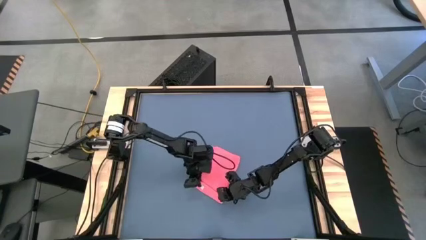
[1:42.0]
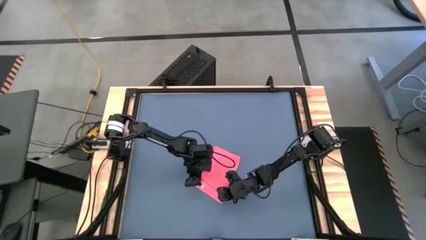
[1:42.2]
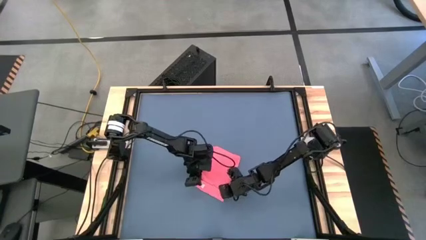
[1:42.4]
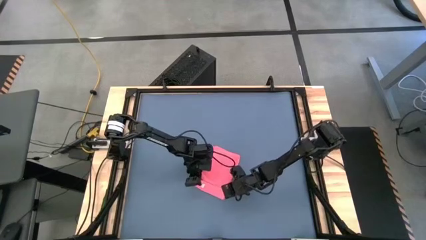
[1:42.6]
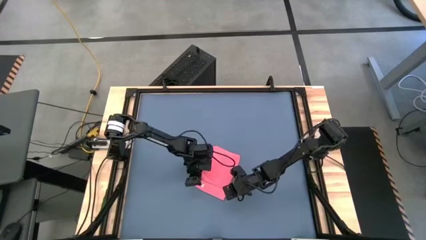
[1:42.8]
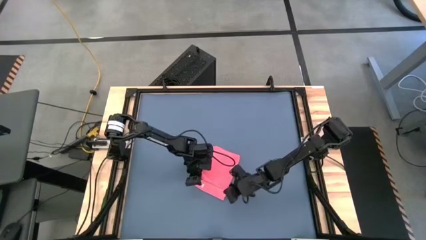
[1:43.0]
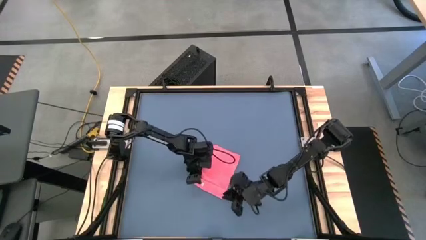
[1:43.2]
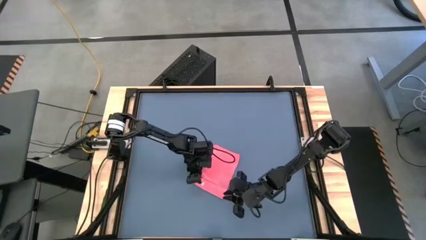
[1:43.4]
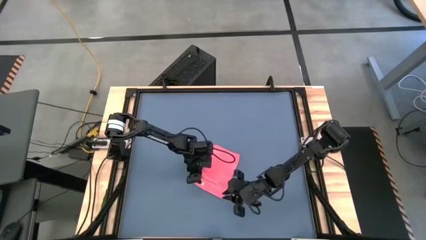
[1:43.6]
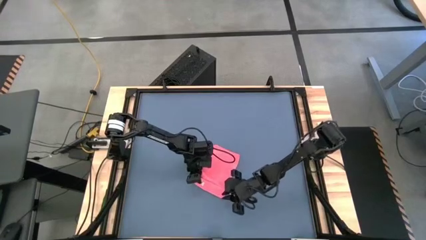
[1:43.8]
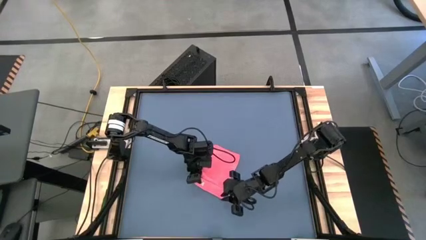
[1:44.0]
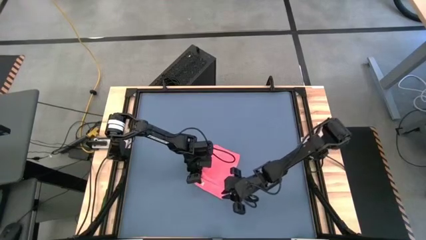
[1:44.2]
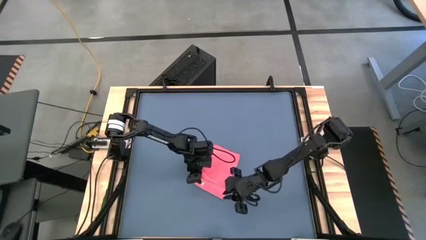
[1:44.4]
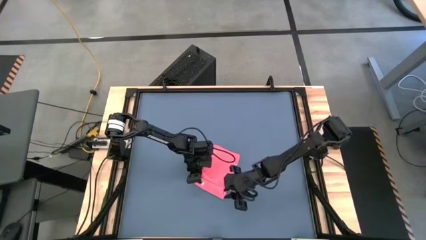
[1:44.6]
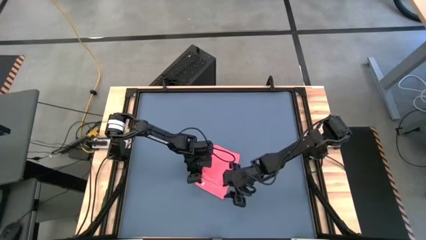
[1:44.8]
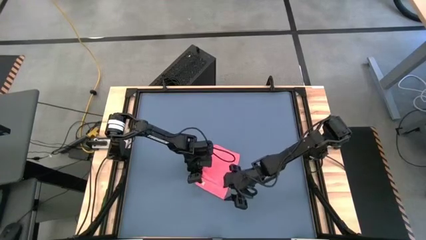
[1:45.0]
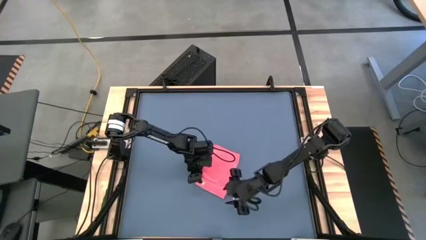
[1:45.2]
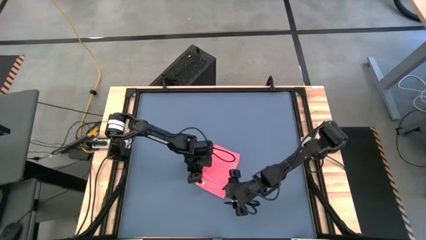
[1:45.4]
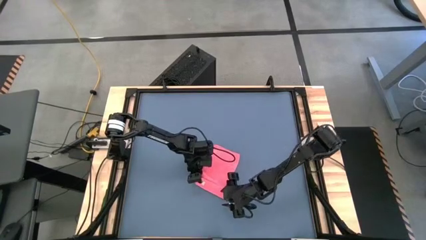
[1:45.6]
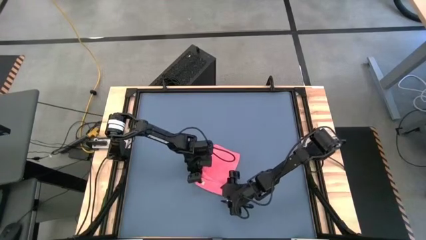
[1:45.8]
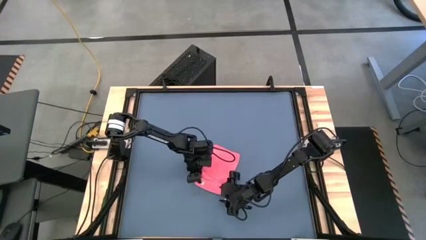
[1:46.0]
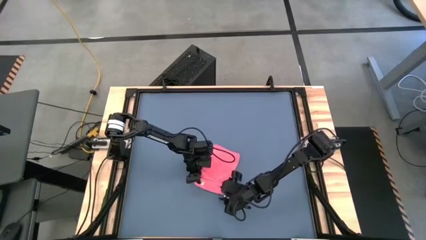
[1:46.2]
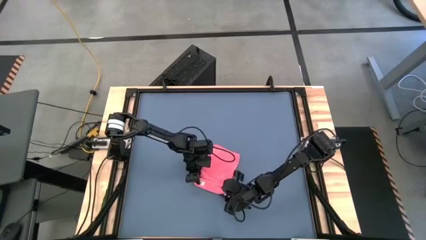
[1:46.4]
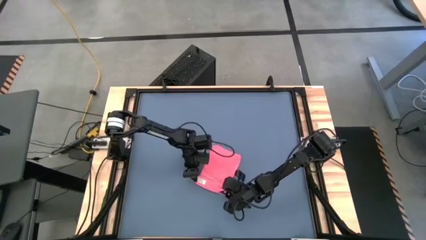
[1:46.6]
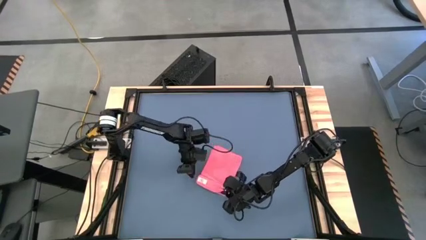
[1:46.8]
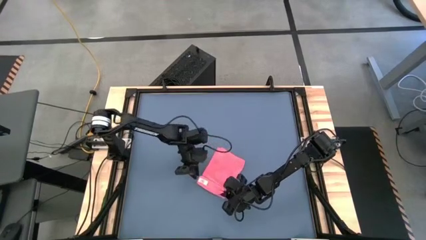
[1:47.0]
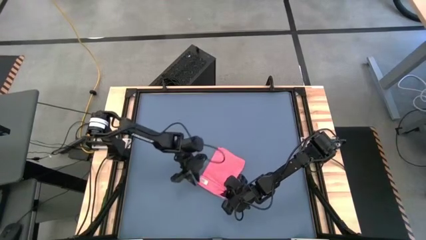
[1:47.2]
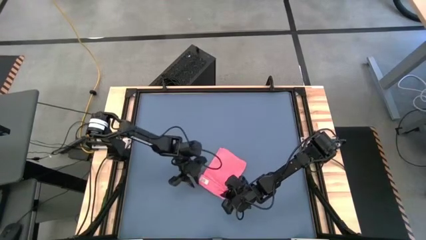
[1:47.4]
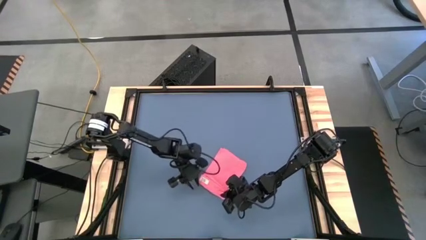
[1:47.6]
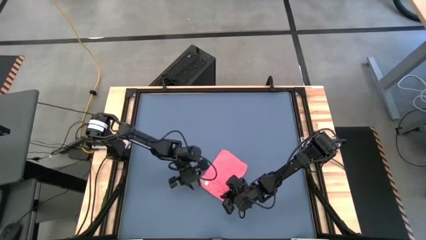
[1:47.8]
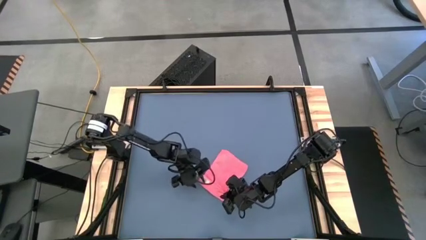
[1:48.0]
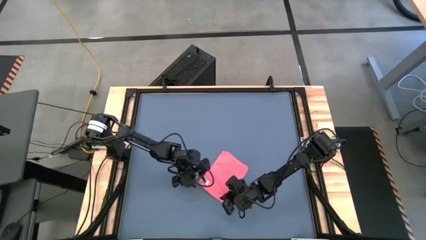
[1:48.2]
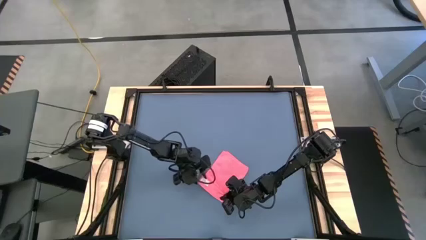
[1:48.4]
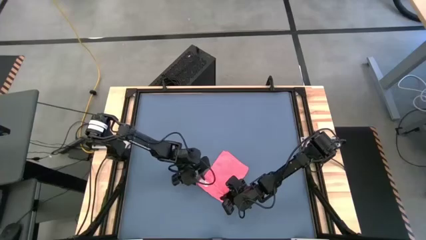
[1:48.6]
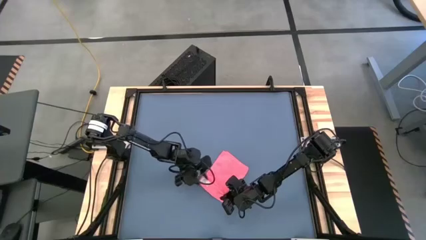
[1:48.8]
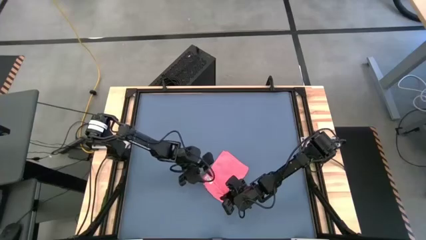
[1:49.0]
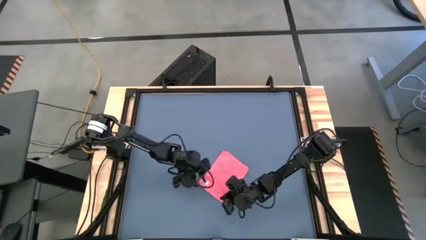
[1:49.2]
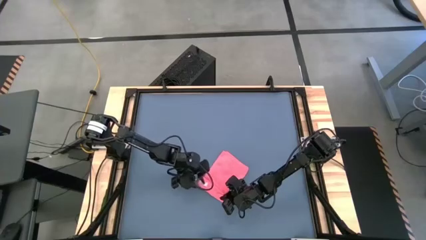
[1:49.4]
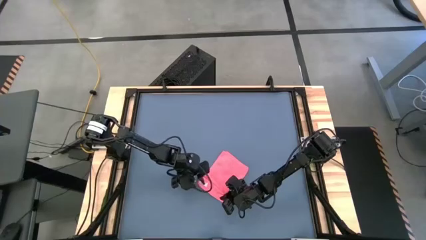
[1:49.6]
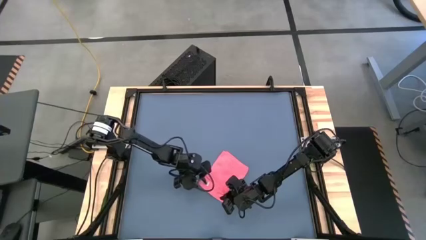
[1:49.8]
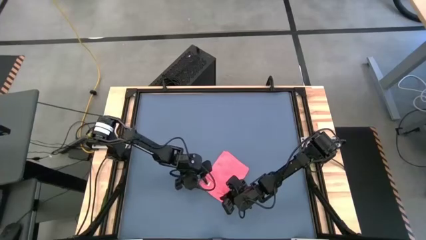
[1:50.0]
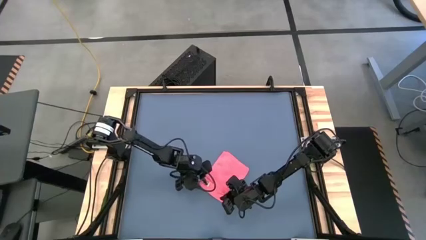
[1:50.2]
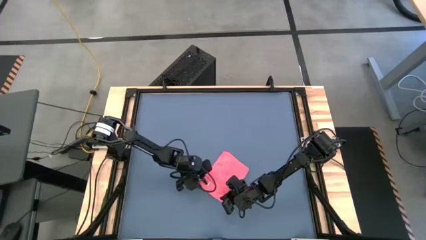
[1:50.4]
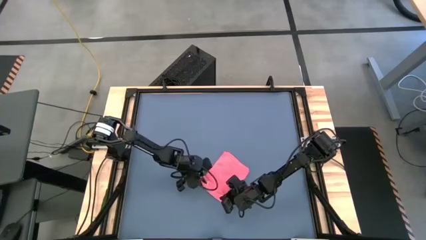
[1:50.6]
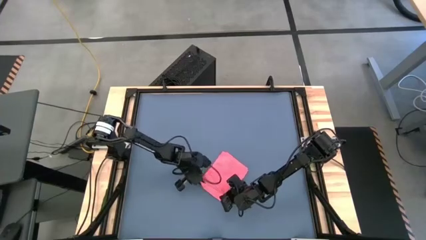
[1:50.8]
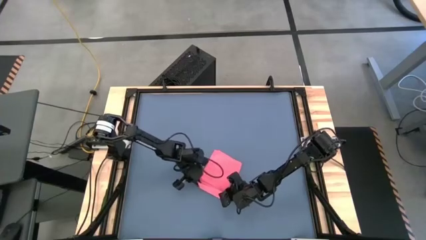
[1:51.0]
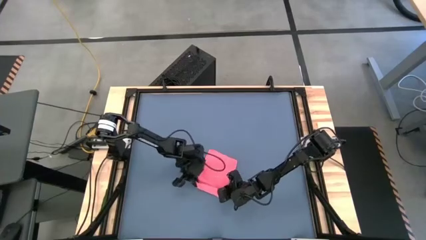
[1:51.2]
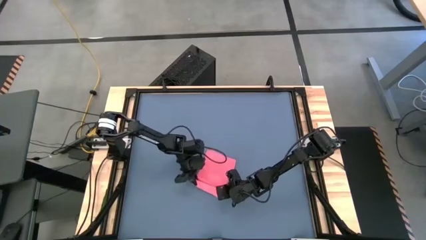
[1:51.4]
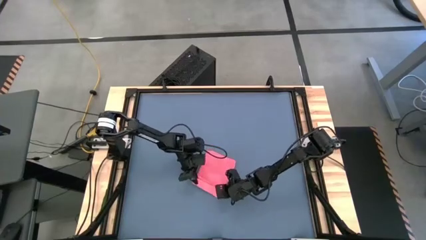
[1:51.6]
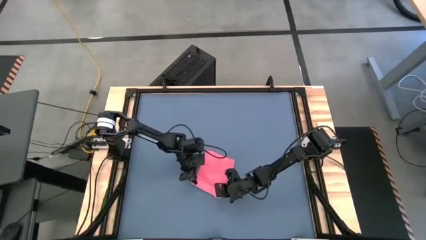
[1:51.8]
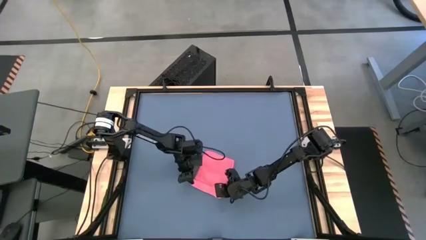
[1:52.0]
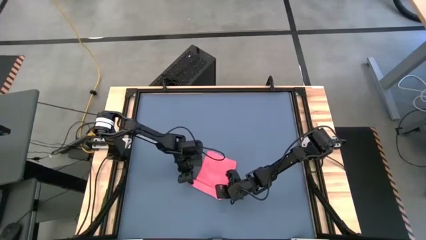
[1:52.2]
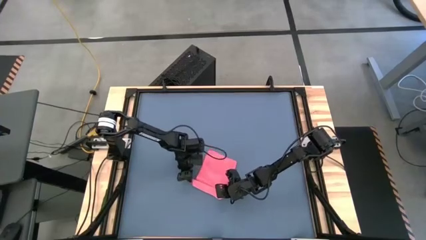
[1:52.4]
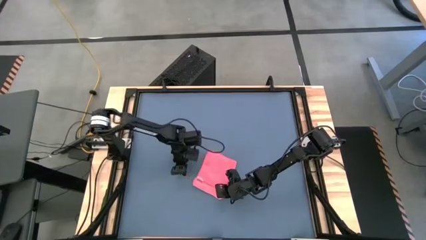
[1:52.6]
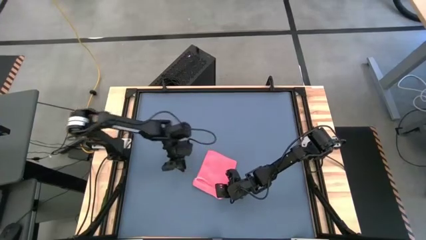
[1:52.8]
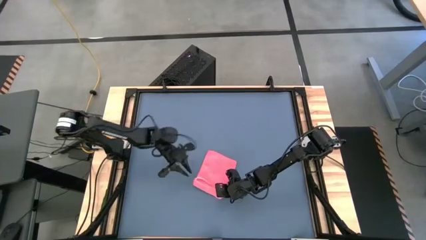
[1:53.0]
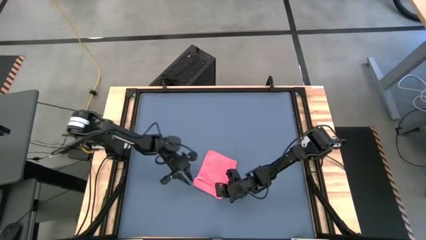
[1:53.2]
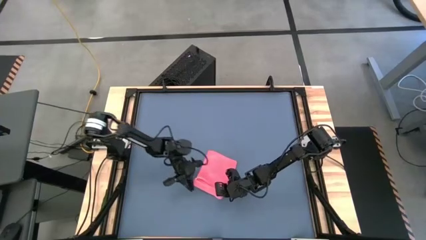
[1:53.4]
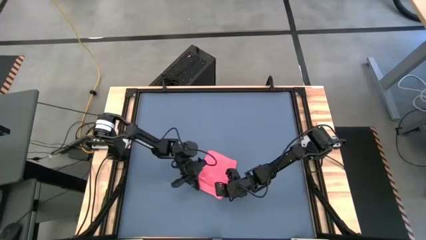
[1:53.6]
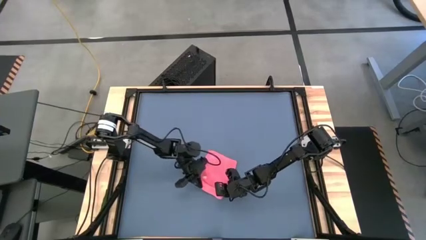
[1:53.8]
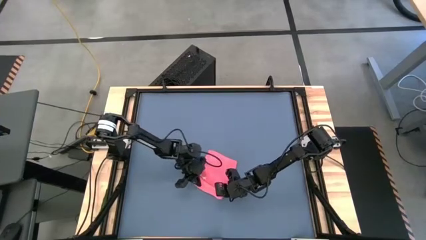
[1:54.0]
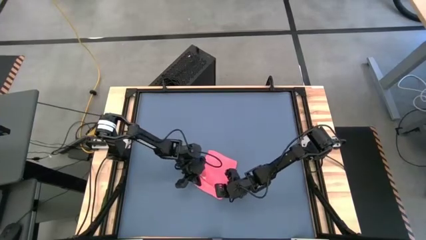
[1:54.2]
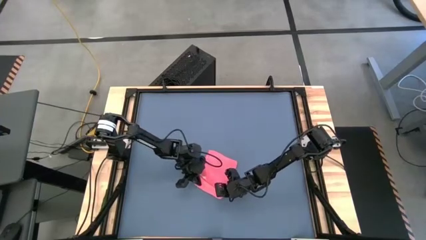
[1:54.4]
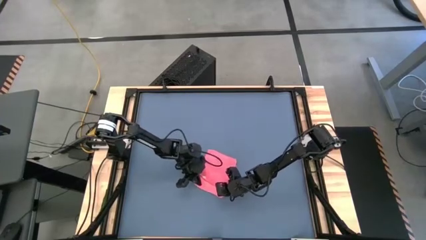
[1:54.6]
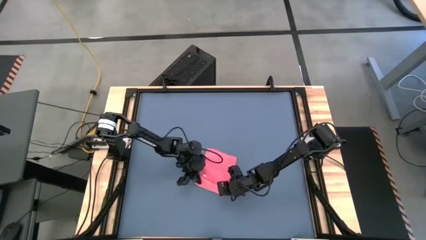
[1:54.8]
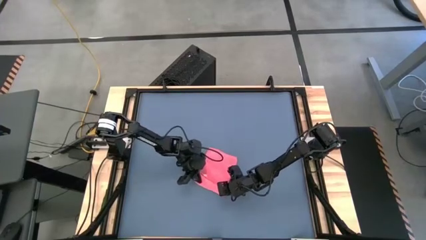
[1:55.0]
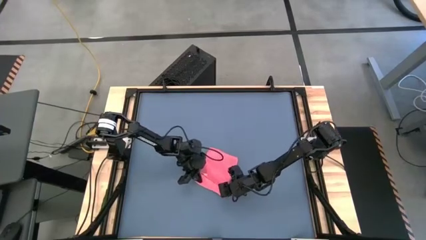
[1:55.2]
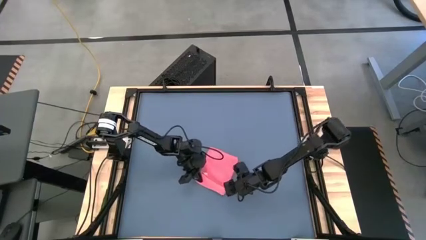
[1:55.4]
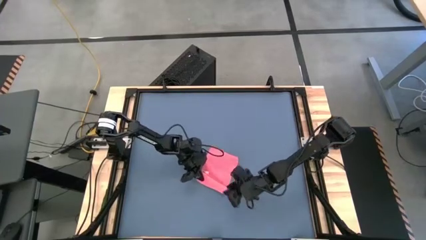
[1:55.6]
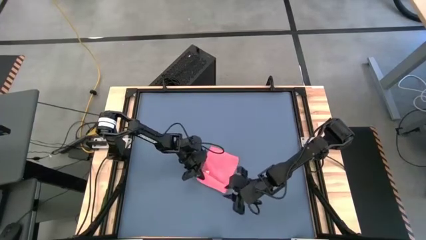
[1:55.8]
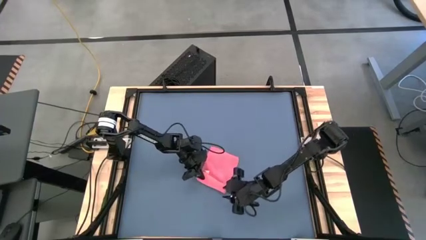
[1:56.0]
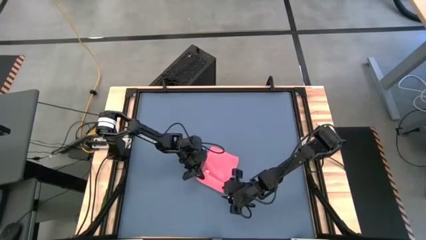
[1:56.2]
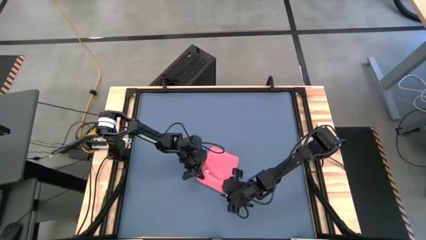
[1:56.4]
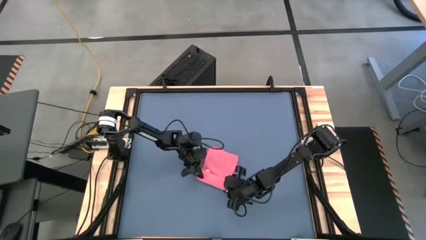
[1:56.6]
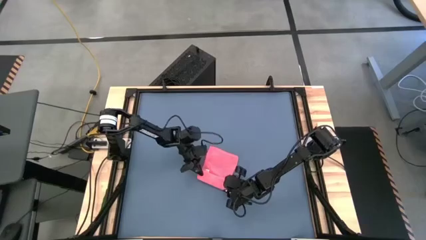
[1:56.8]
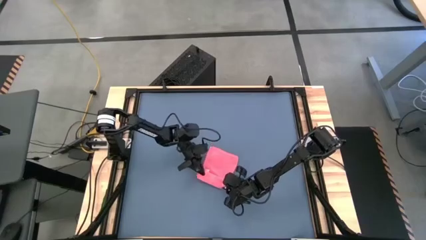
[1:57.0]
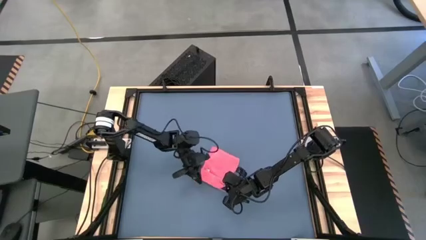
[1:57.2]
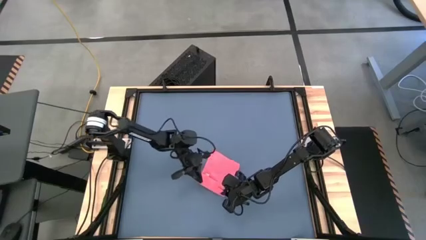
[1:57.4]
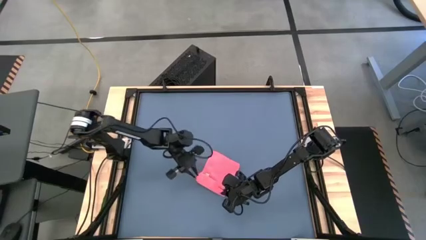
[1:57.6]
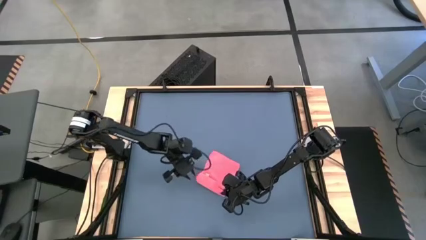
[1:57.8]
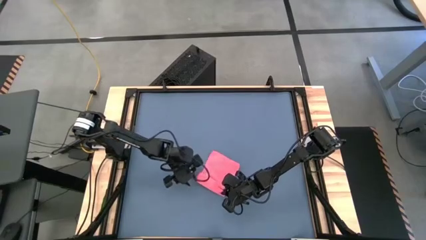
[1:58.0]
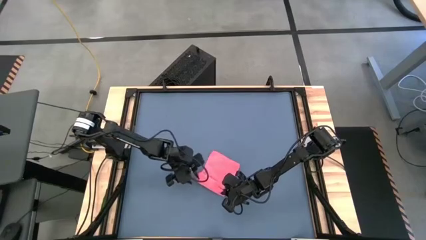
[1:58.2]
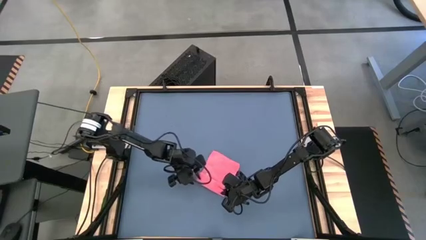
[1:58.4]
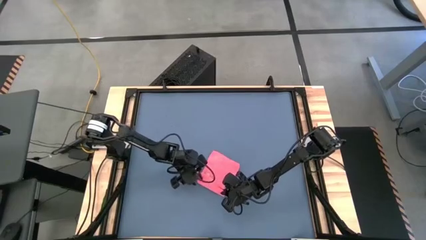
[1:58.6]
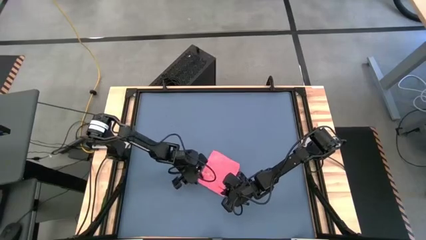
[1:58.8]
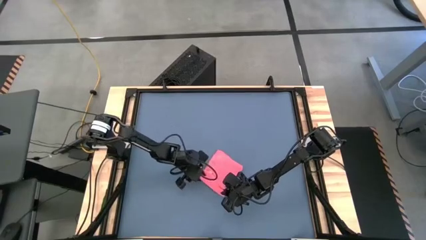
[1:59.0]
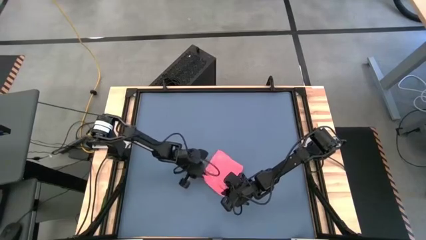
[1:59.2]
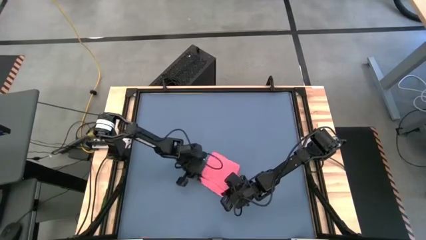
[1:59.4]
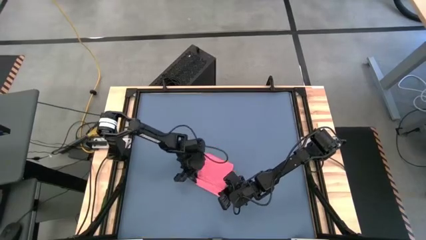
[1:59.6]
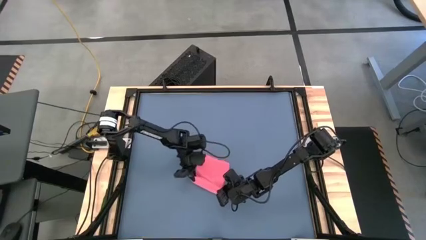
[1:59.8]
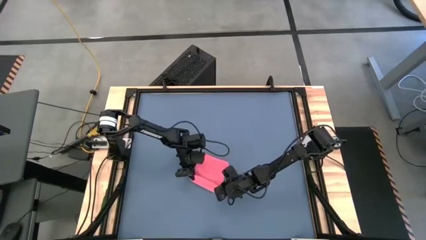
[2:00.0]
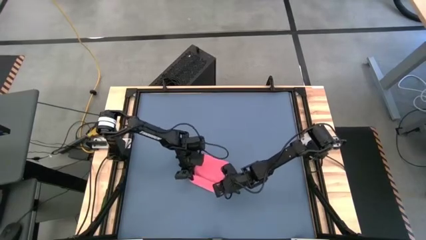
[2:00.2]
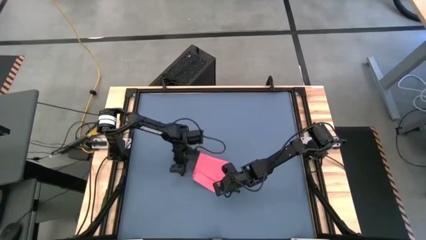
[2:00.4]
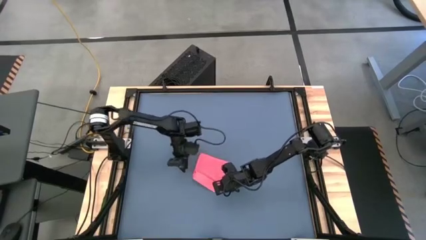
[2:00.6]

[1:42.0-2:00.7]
Task: Roll towel
Roll the pink towel
